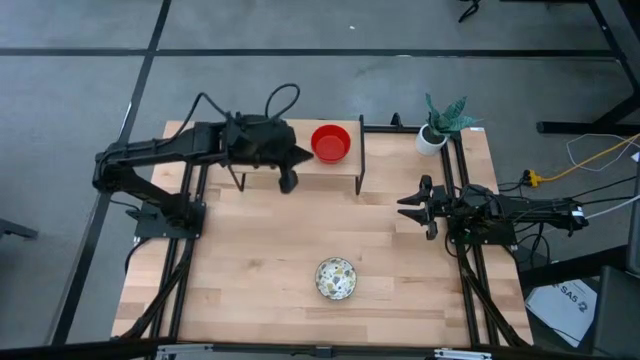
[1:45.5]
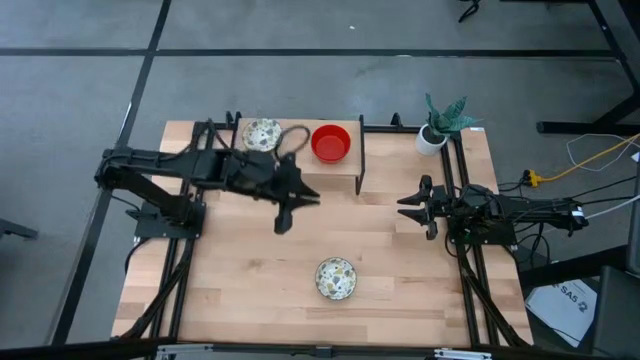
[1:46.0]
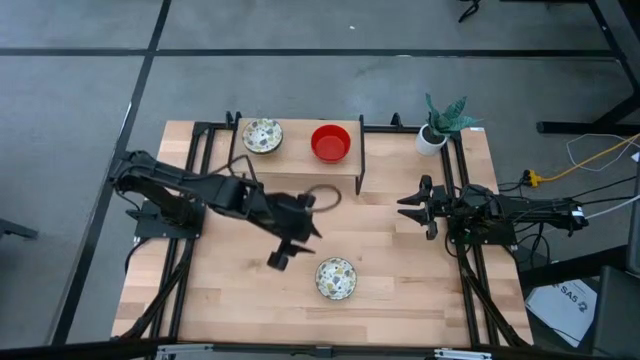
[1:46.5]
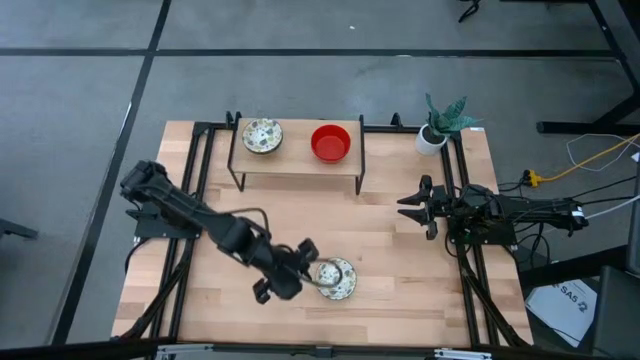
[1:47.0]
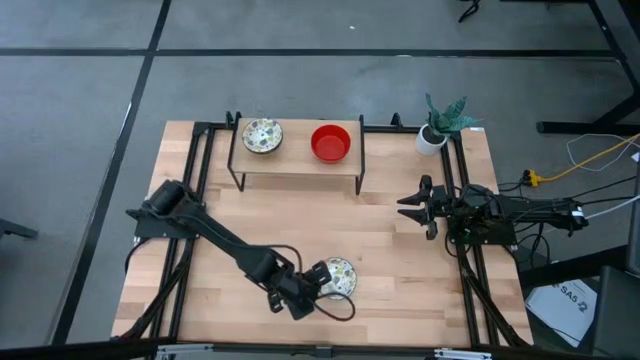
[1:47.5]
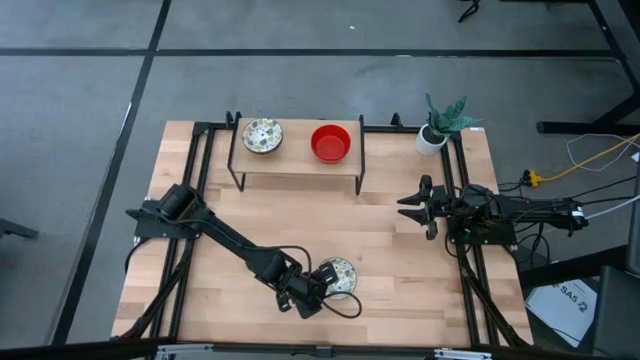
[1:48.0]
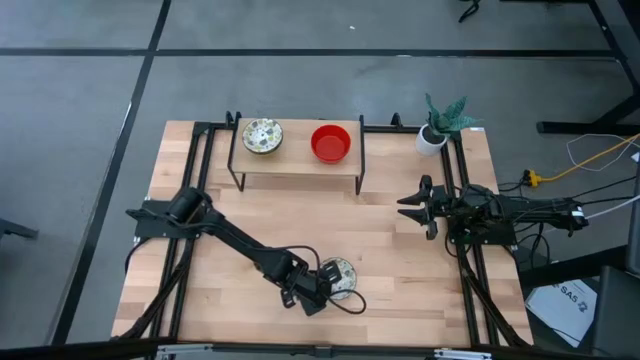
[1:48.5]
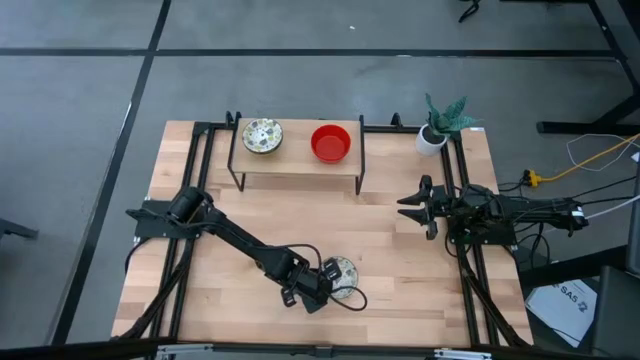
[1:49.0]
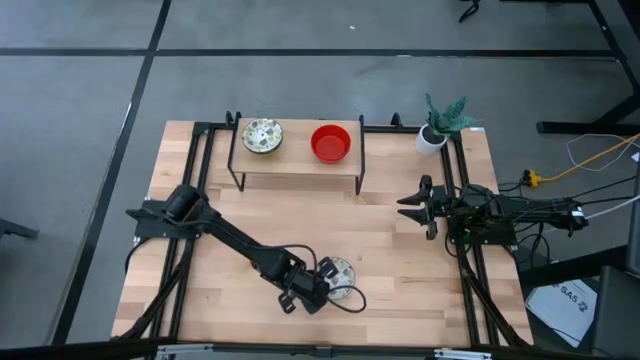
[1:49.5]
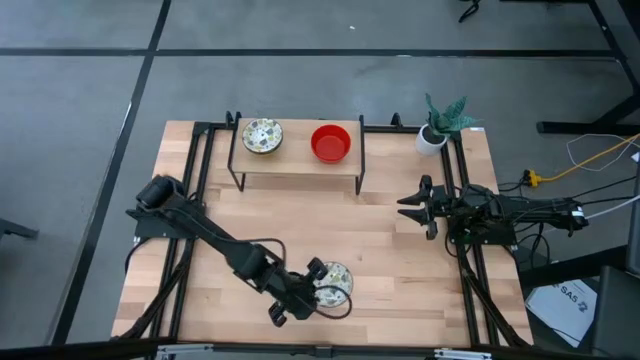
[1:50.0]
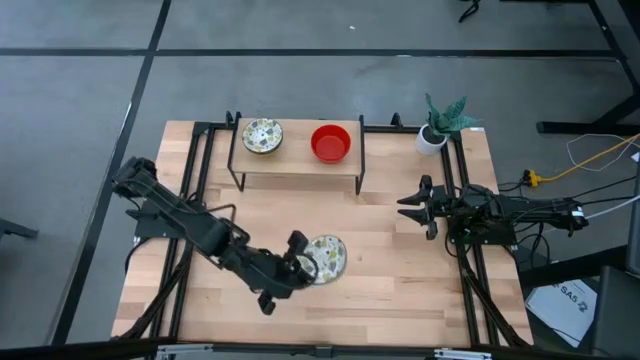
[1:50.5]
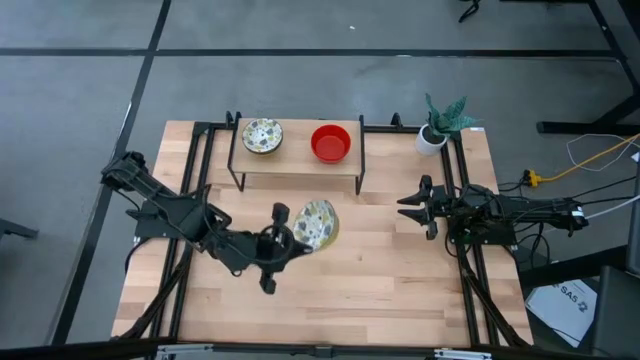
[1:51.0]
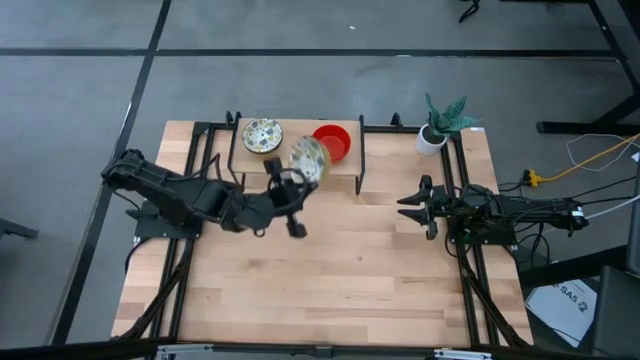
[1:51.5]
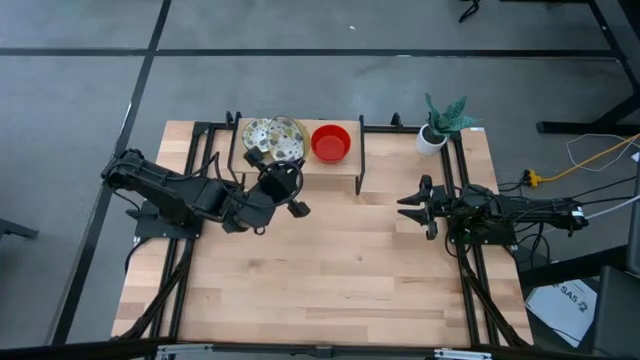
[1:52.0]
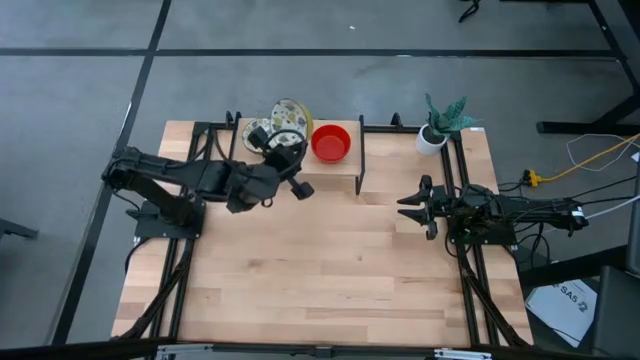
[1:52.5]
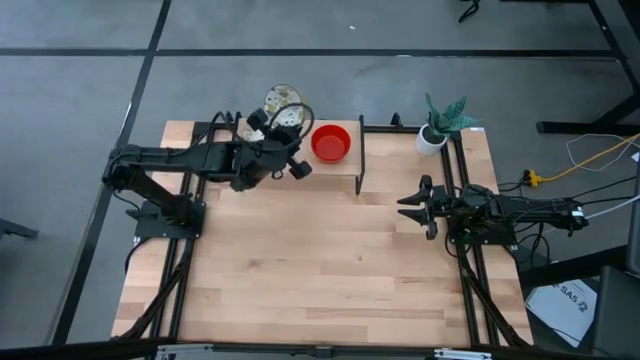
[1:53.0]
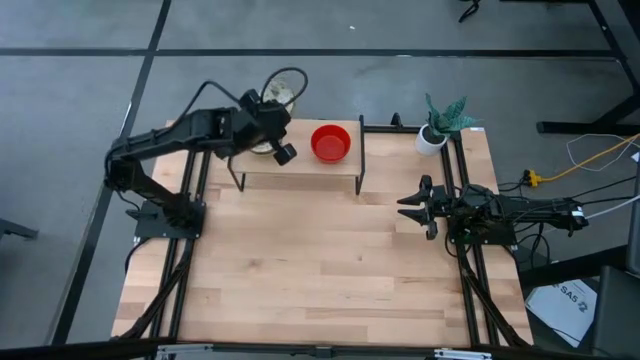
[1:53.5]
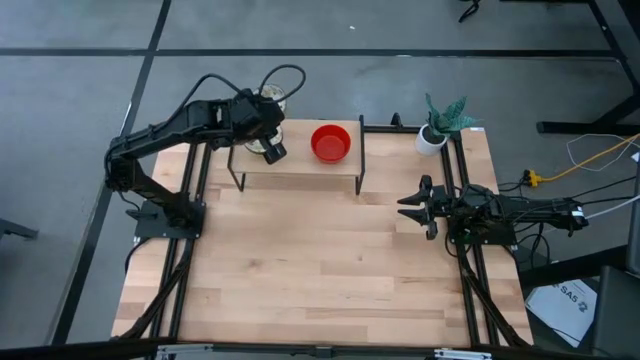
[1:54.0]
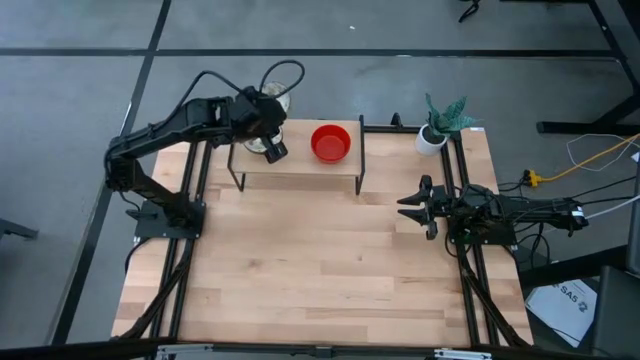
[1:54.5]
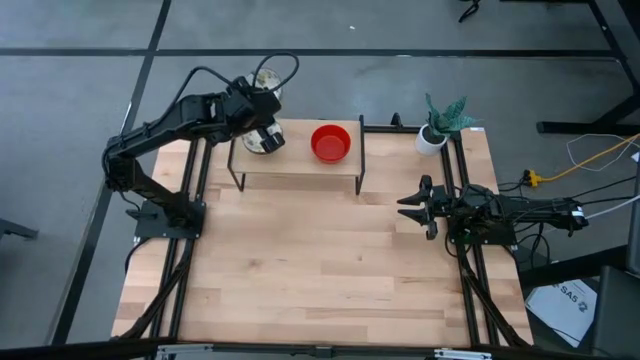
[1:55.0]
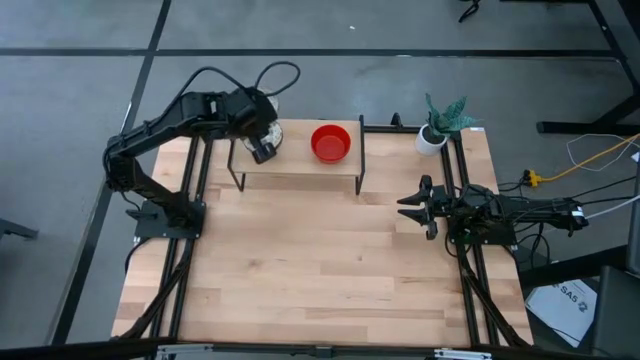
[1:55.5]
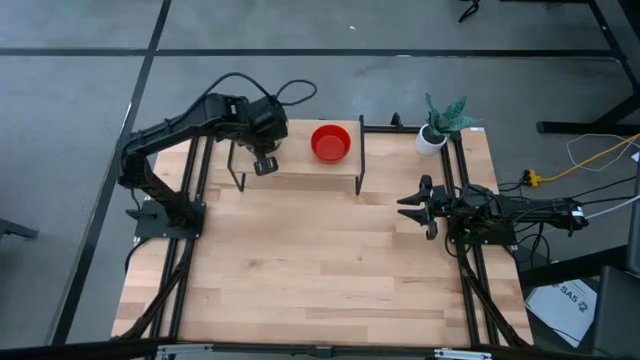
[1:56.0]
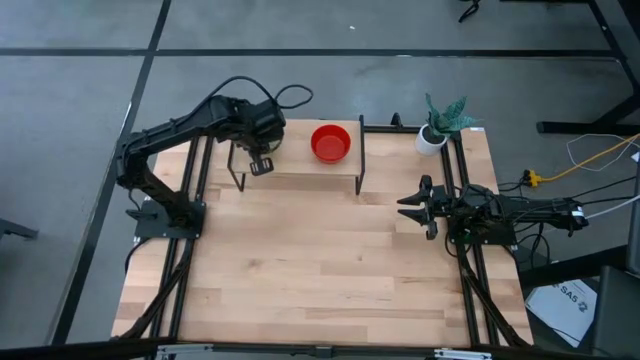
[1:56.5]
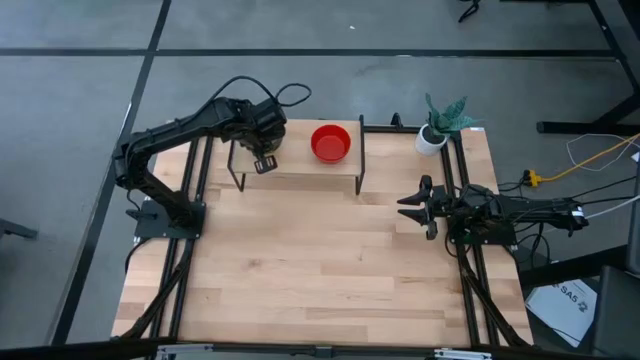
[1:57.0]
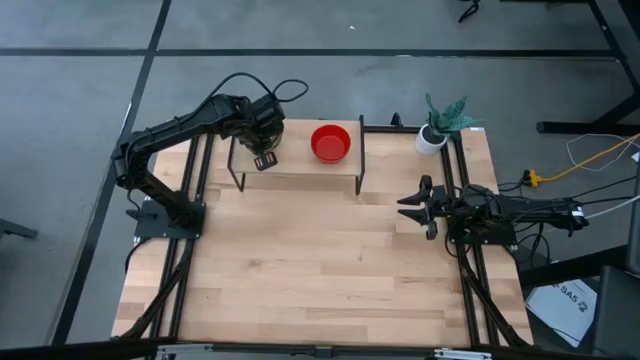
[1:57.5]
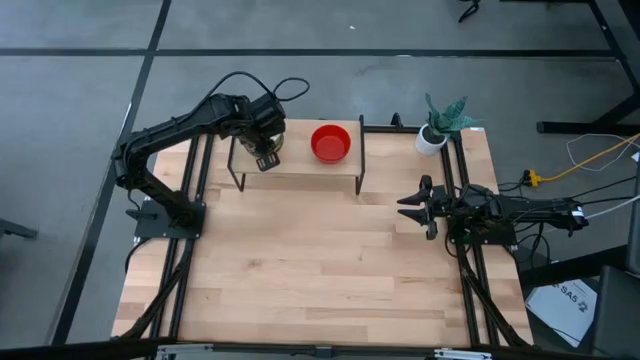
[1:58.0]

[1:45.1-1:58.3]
Task: Pick & Place Mini bowls
Stack the white patterned bowl on the white patterned bowls on the shelf

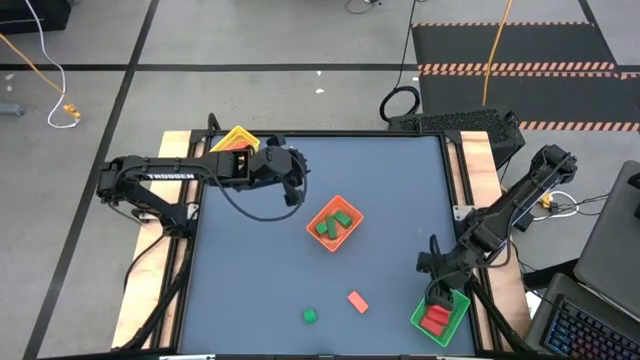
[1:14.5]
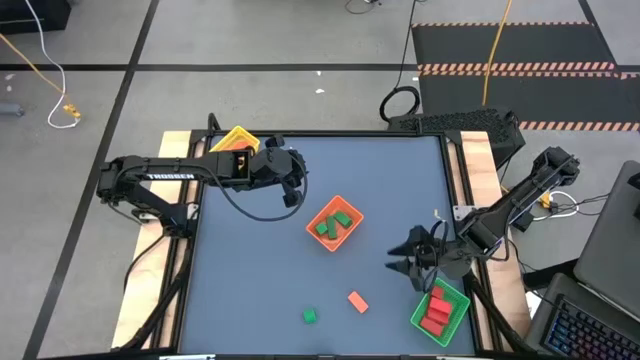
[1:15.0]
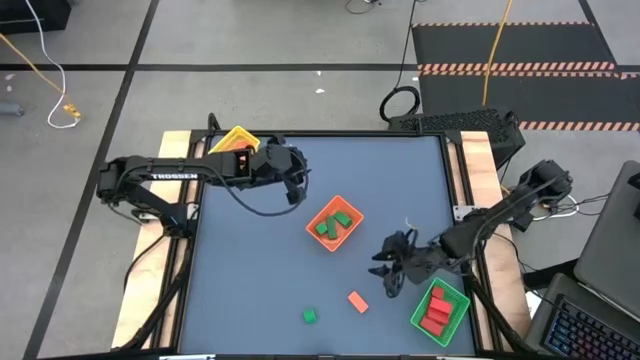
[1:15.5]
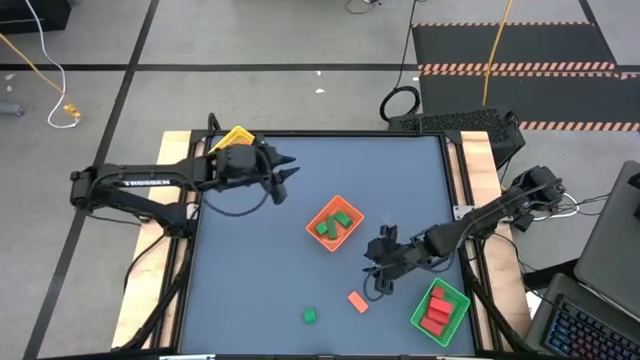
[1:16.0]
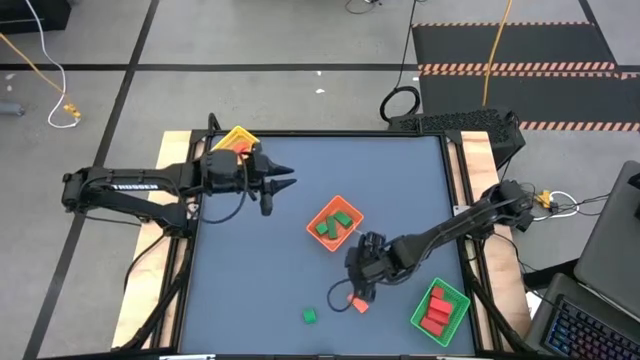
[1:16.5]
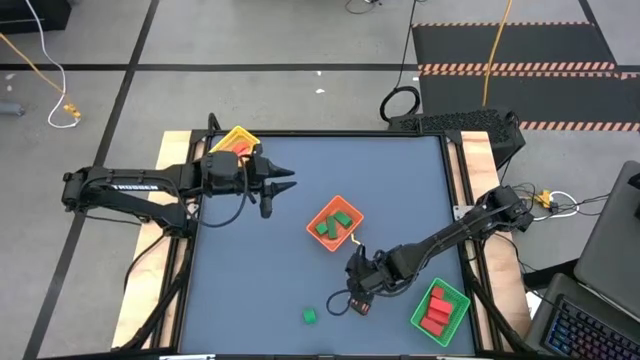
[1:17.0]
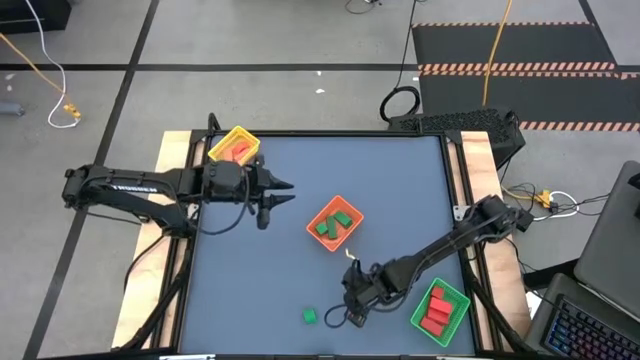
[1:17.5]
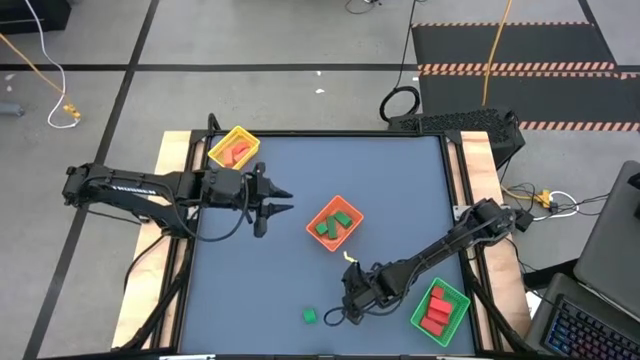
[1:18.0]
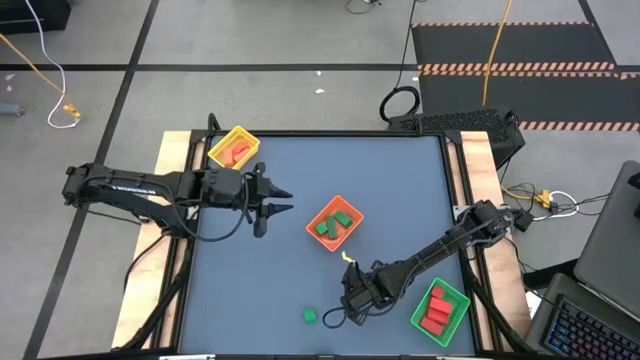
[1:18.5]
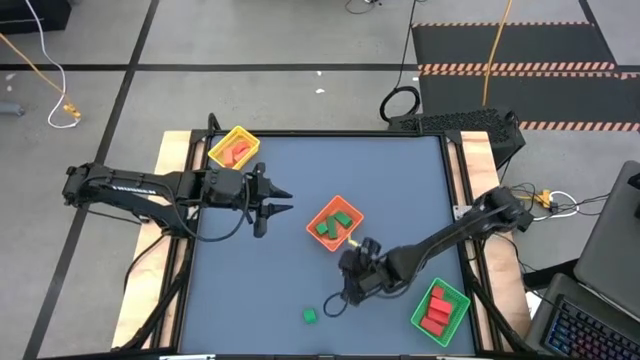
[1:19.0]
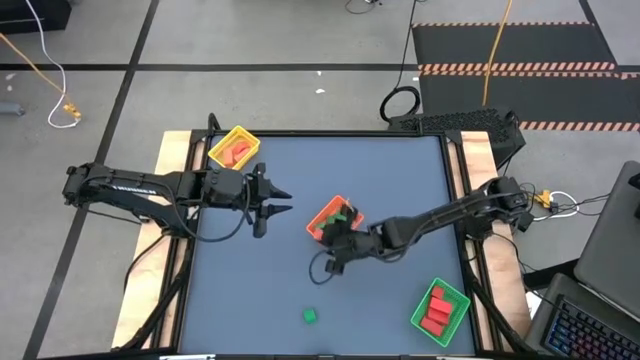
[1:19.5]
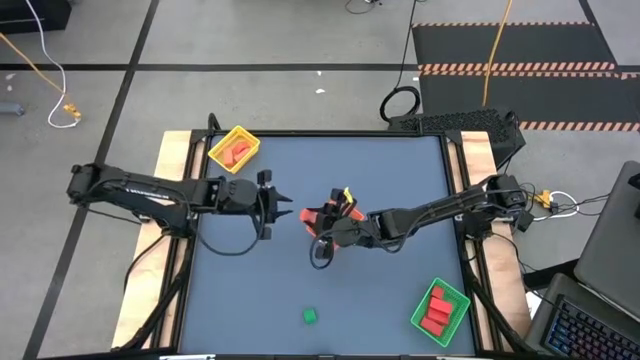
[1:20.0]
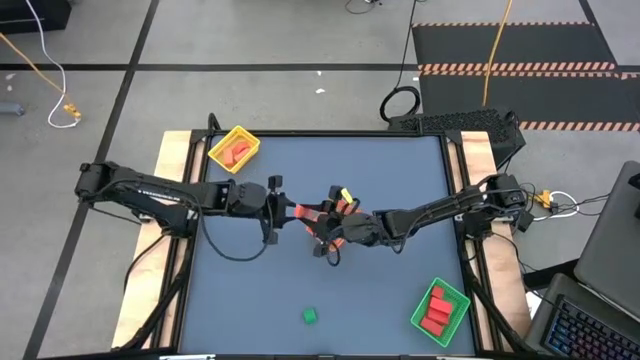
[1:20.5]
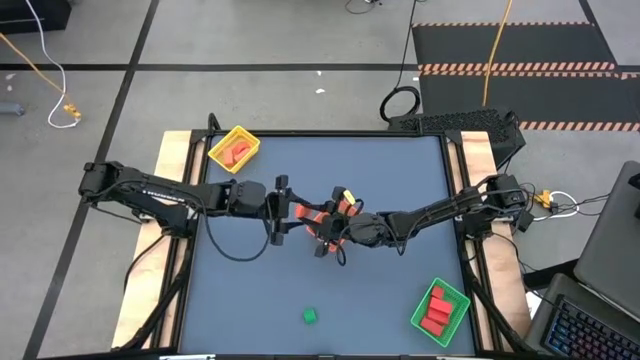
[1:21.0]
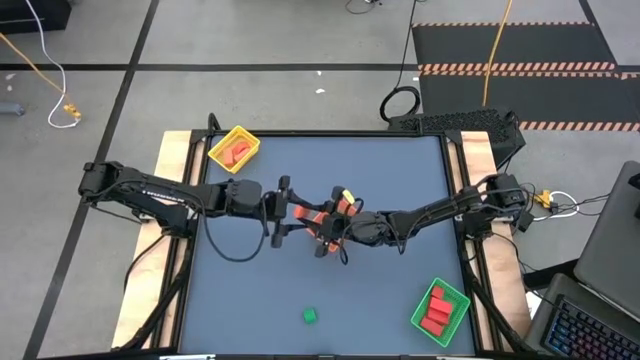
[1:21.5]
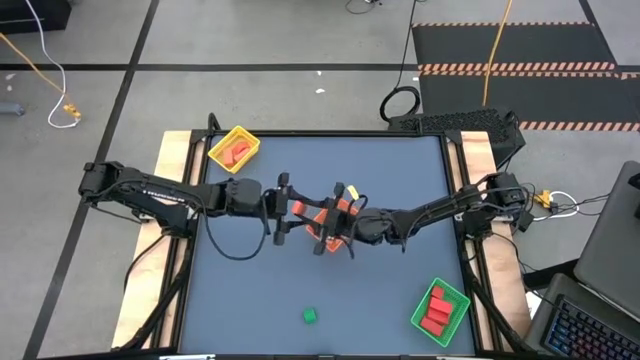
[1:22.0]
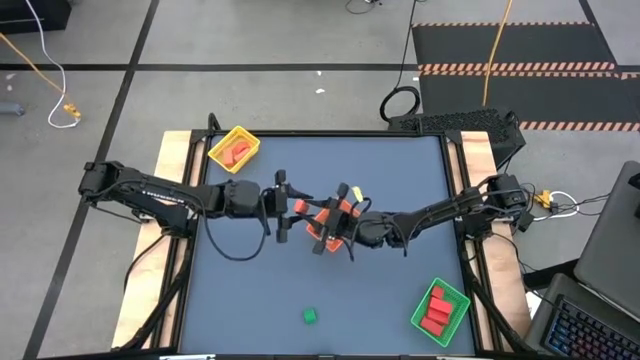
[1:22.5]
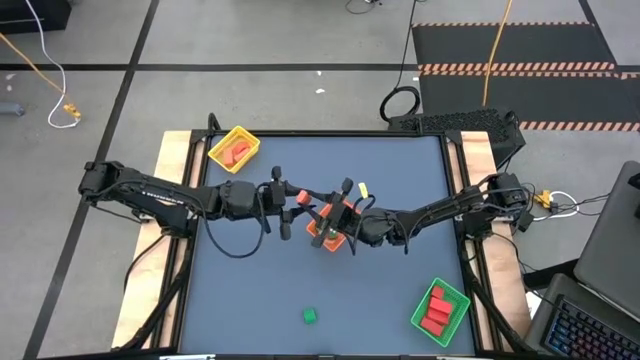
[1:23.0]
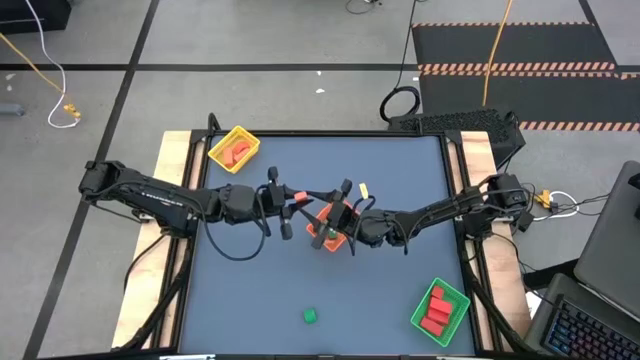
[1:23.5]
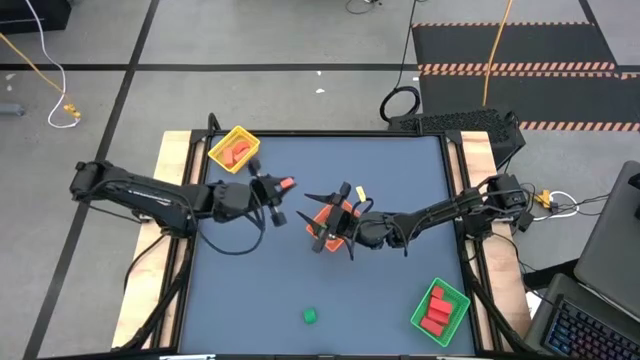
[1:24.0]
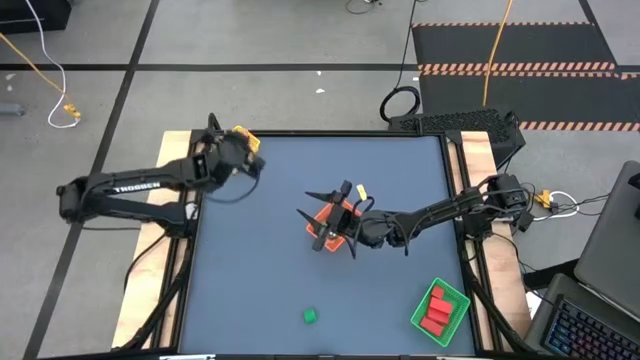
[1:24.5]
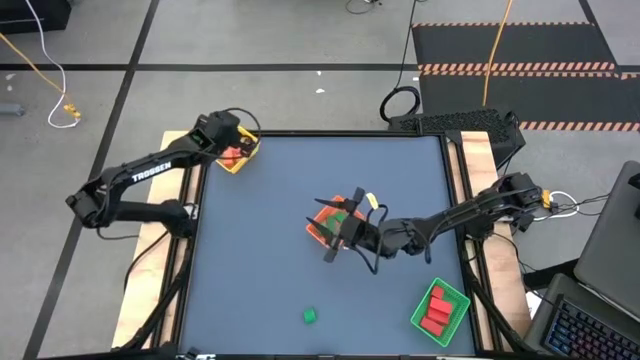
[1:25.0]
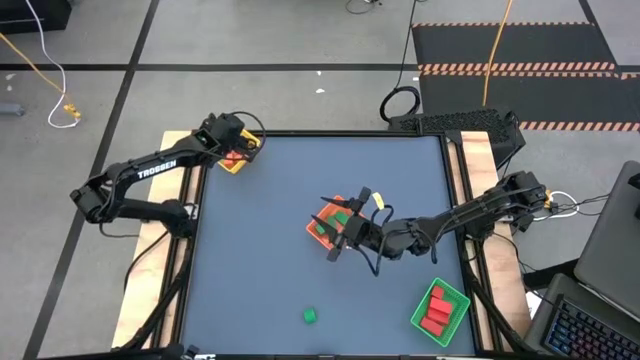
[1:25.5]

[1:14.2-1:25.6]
Task: Sort & place blocks by color
Put the orange block into the yellow bin
